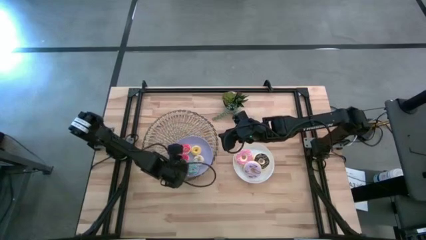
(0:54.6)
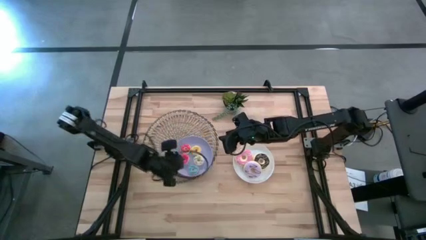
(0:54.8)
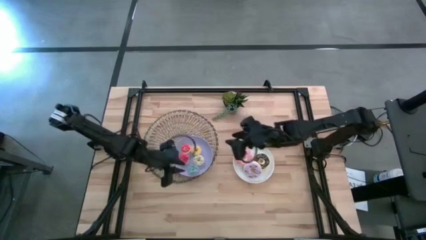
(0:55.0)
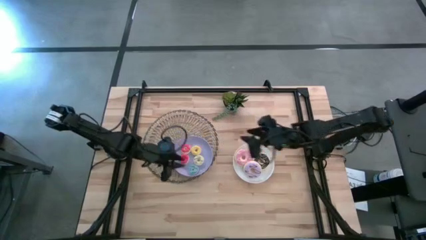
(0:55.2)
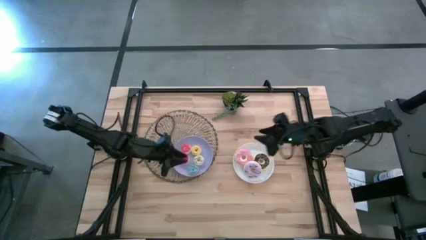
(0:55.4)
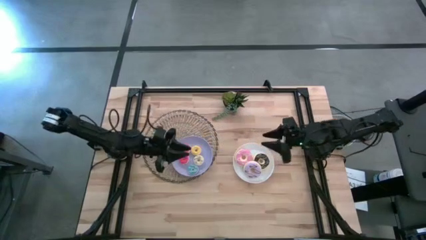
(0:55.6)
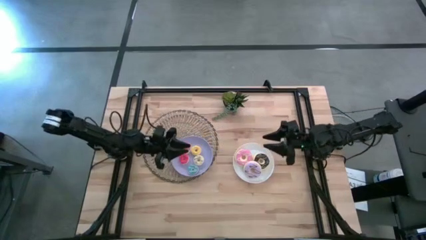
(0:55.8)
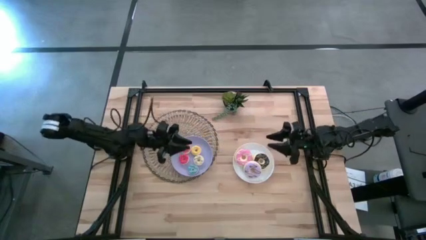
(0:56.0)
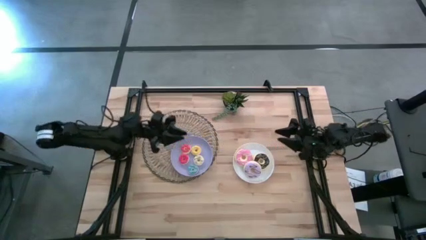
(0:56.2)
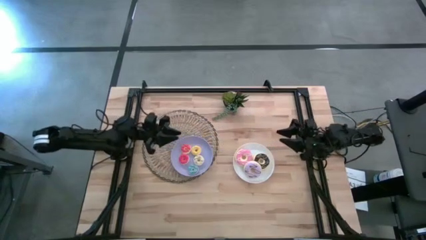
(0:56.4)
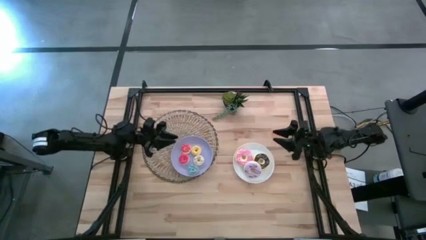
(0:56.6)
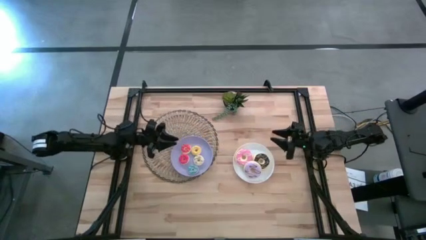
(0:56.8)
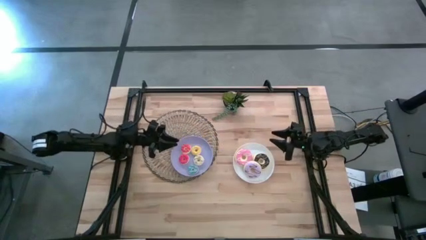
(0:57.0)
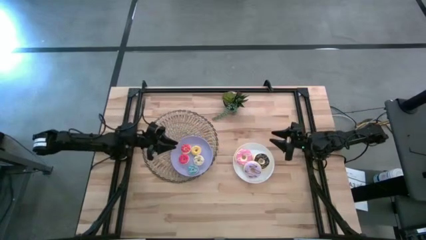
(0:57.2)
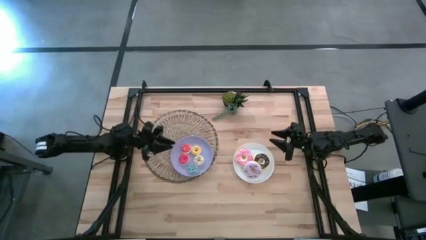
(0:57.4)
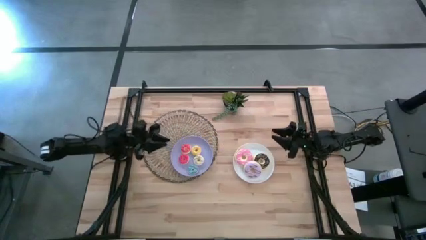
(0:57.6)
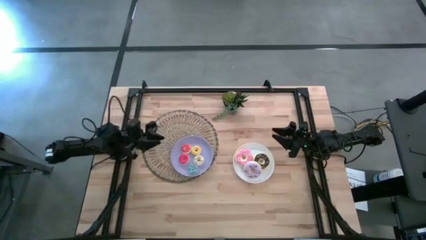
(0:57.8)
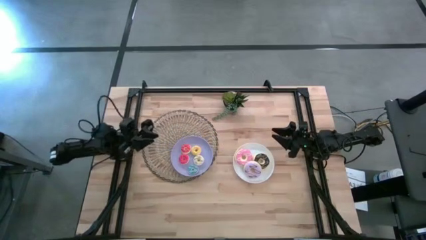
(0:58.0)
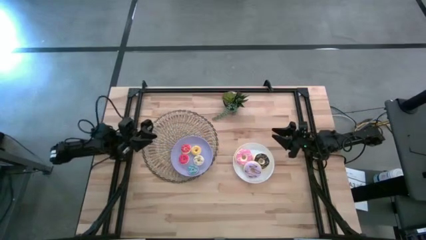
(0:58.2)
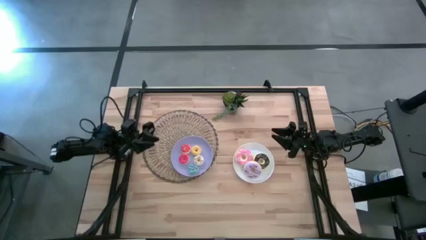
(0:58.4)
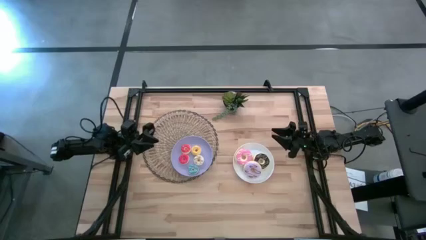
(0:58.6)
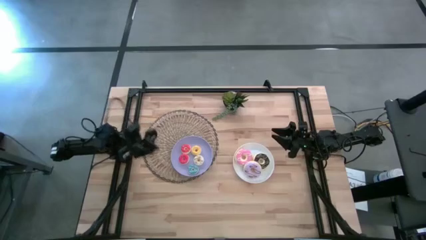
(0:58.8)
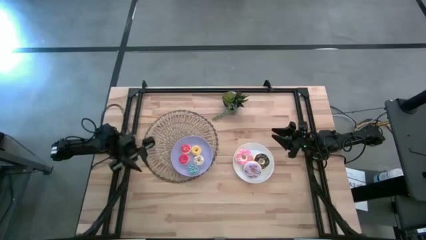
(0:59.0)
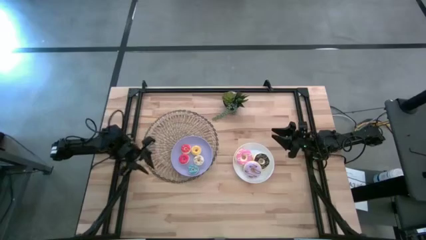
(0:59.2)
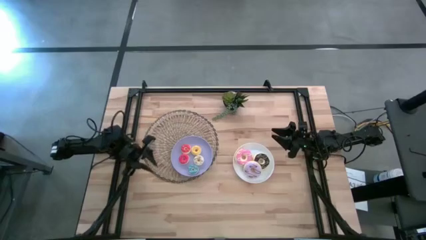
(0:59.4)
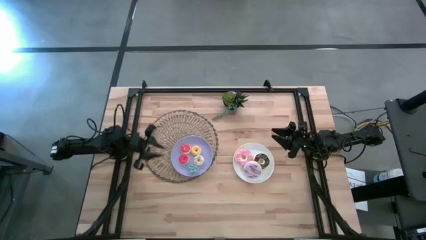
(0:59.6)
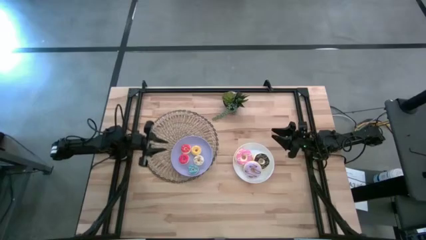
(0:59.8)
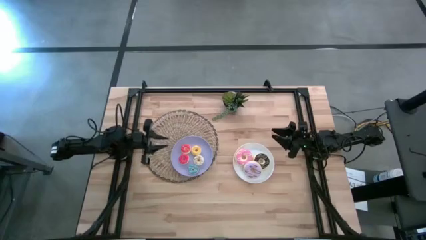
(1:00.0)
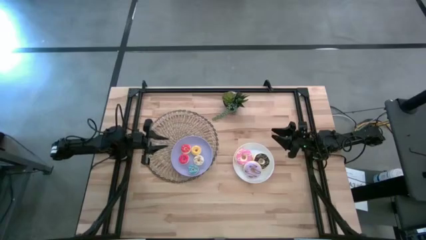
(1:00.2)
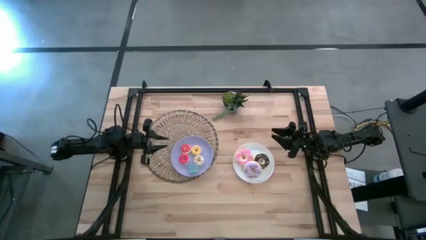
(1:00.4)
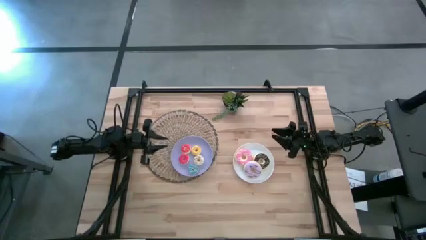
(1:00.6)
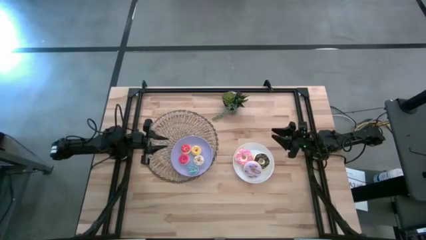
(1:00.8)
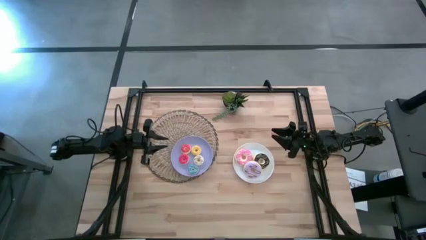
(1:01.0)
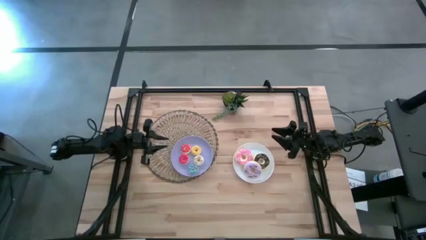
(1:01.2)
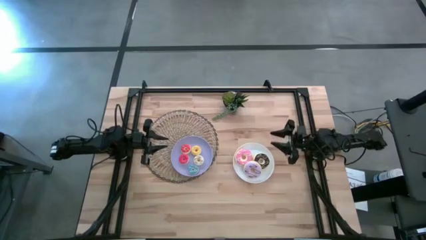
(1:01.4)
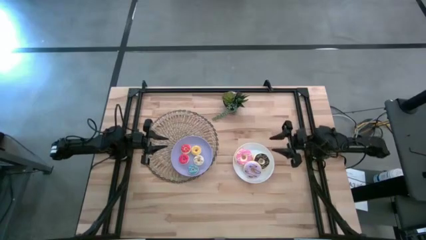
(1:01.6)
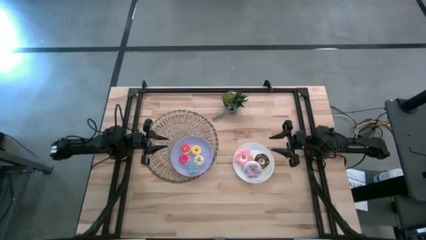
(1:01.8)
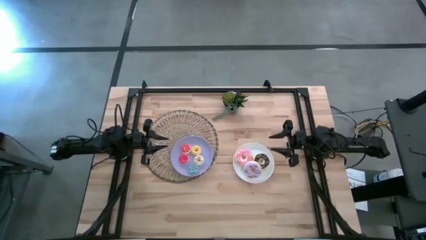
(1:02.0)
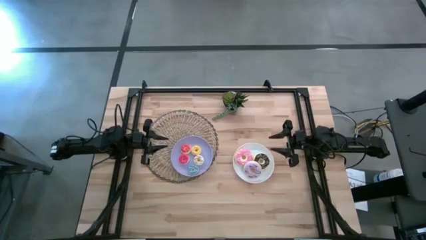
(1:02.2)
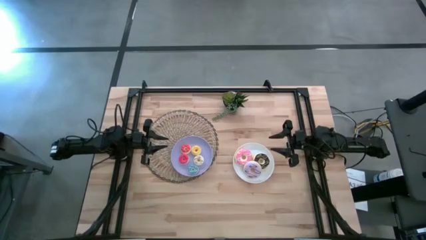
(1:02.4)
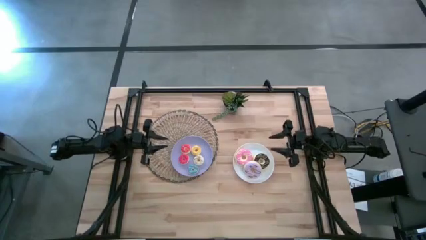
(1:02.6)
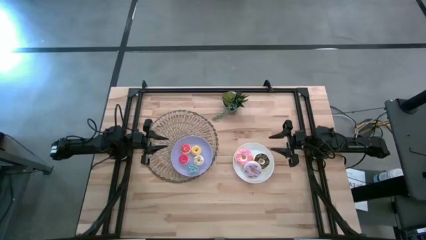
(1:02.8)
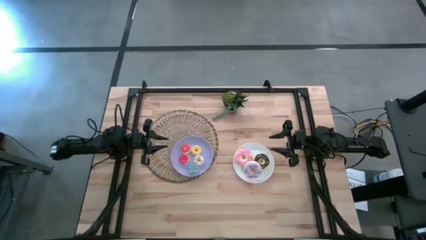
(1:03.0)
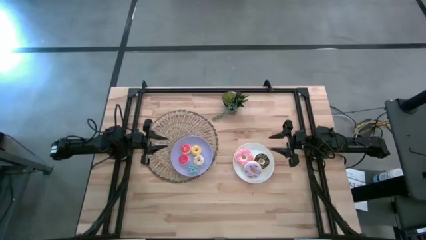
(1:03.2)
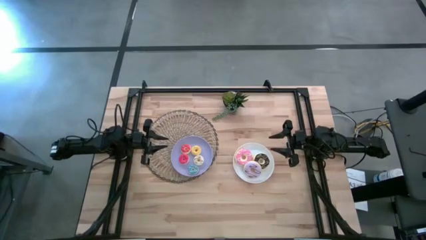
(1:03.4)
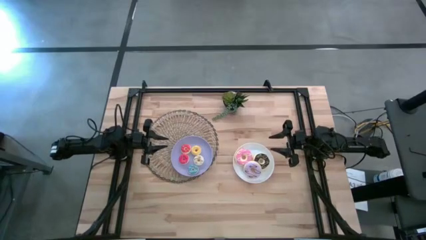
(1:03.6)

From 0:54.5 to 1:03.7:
Task: Pick & Place donuts
Return to Home Position

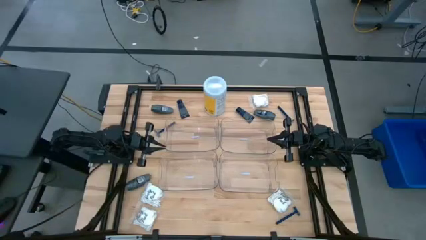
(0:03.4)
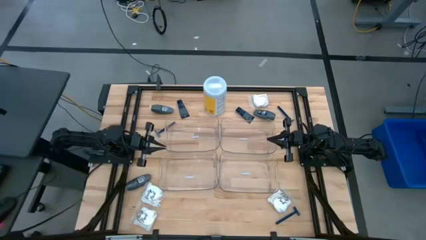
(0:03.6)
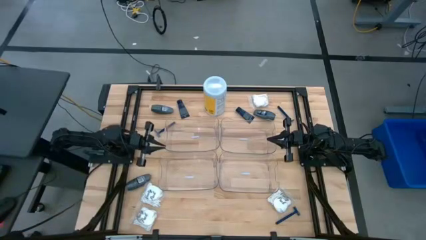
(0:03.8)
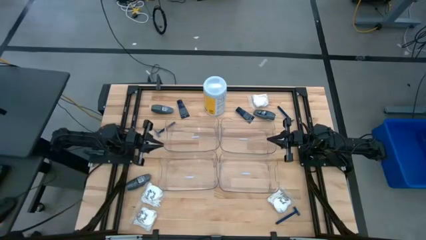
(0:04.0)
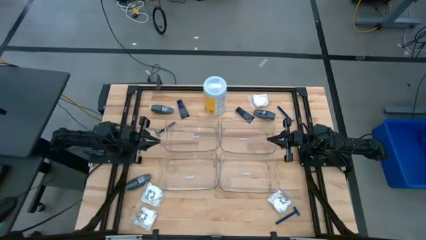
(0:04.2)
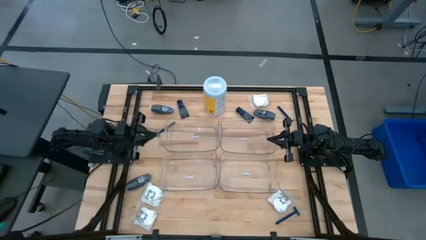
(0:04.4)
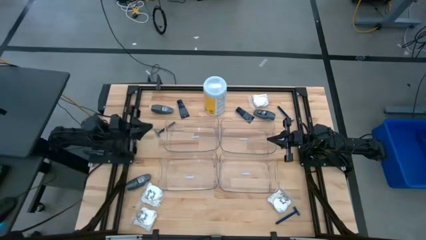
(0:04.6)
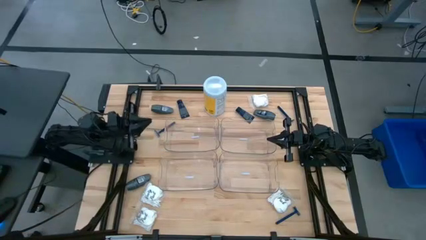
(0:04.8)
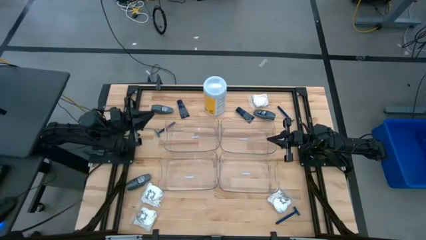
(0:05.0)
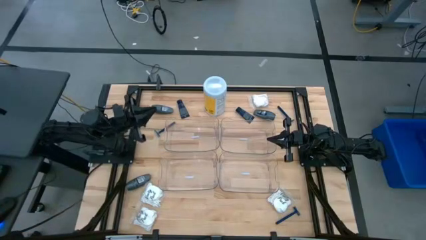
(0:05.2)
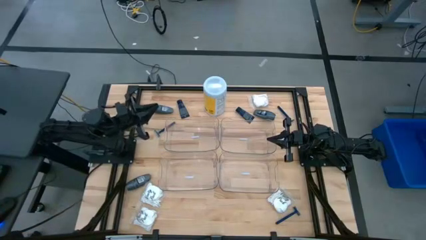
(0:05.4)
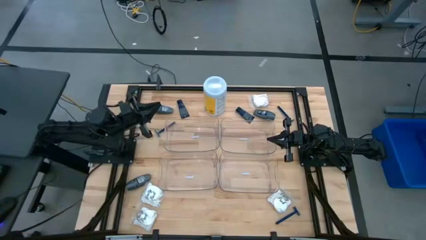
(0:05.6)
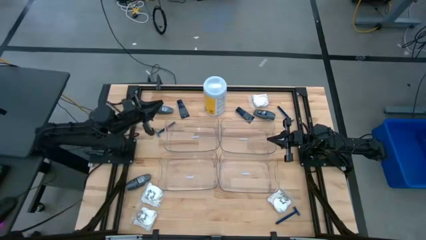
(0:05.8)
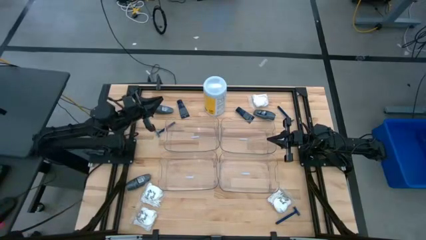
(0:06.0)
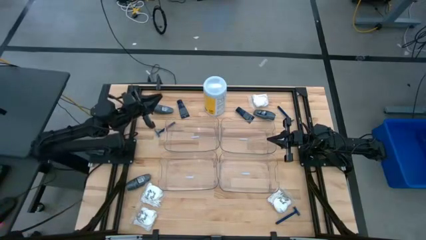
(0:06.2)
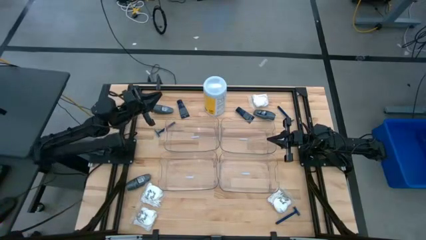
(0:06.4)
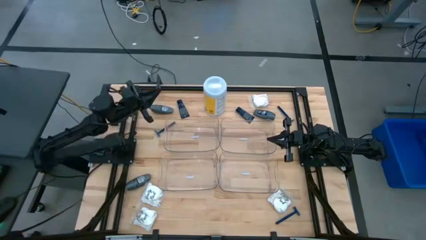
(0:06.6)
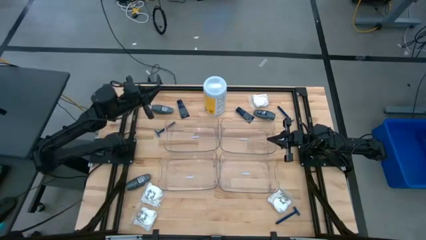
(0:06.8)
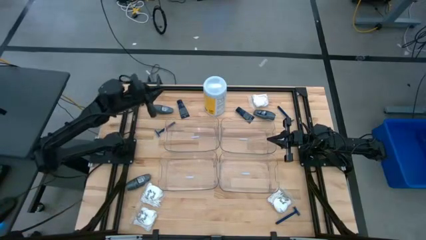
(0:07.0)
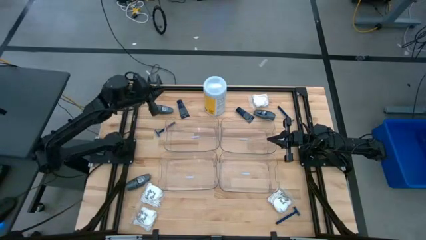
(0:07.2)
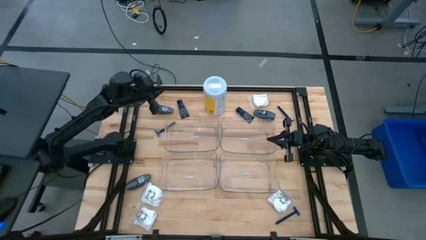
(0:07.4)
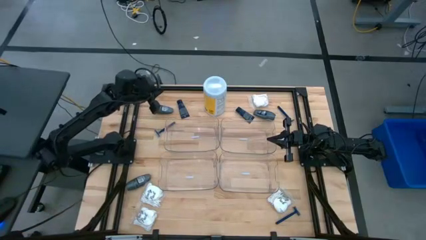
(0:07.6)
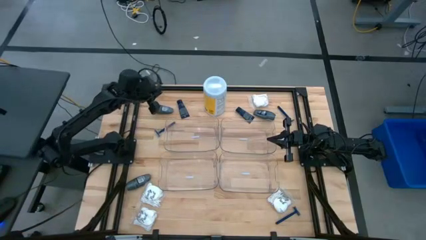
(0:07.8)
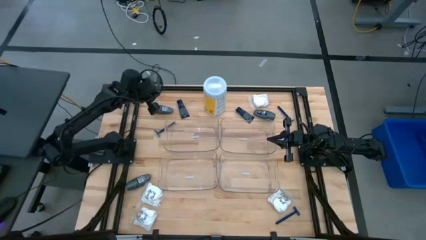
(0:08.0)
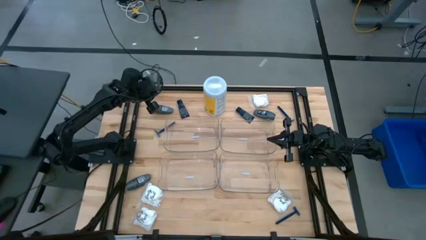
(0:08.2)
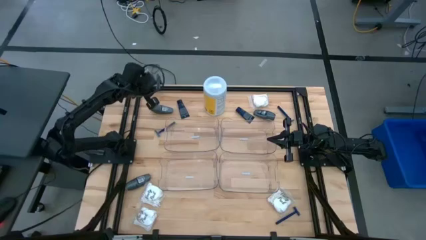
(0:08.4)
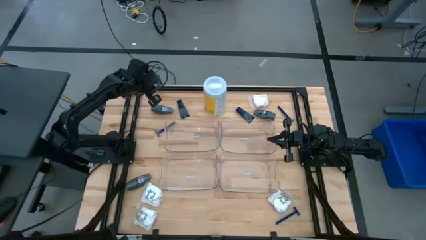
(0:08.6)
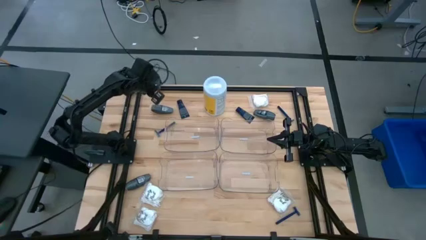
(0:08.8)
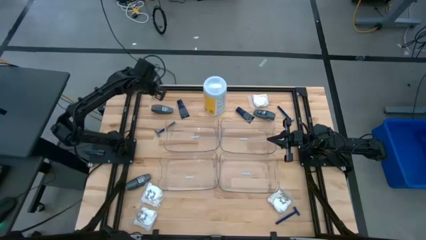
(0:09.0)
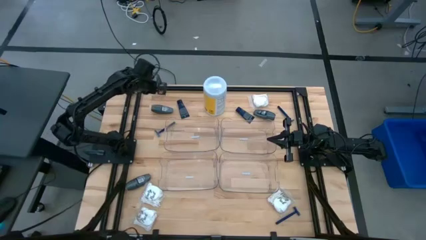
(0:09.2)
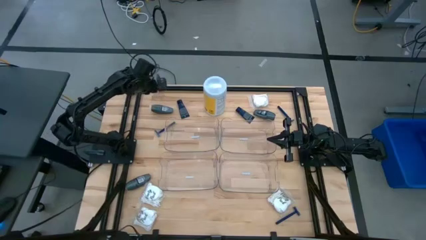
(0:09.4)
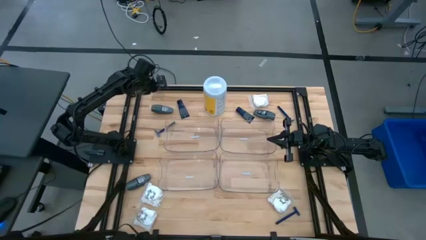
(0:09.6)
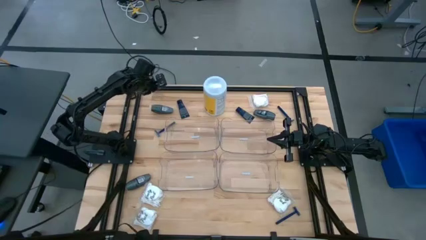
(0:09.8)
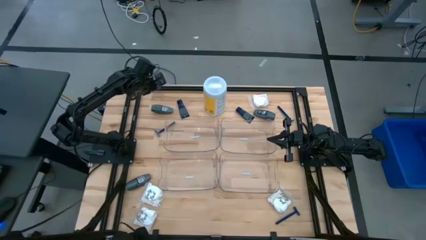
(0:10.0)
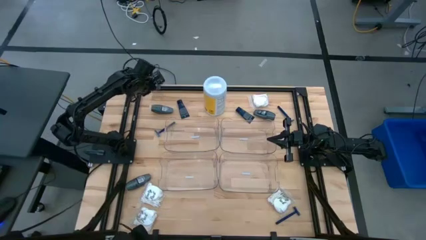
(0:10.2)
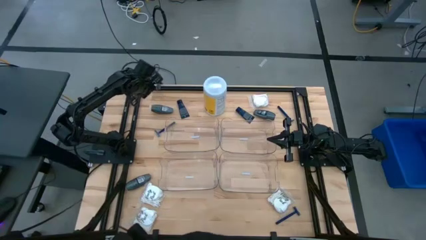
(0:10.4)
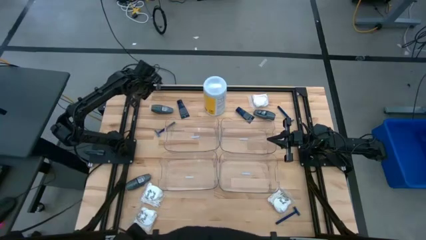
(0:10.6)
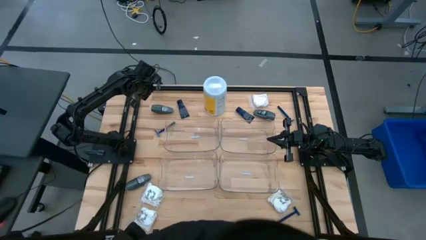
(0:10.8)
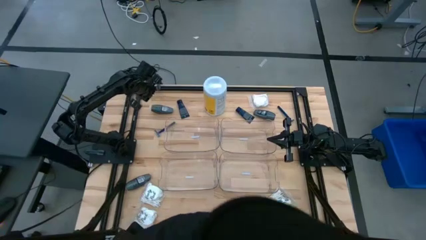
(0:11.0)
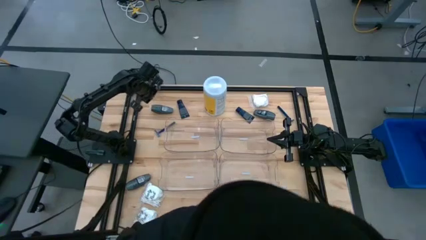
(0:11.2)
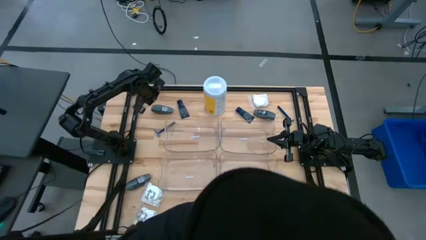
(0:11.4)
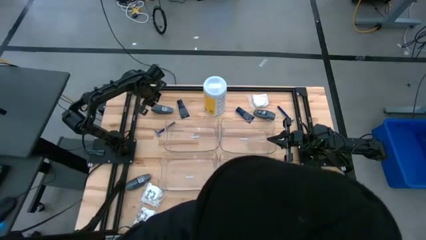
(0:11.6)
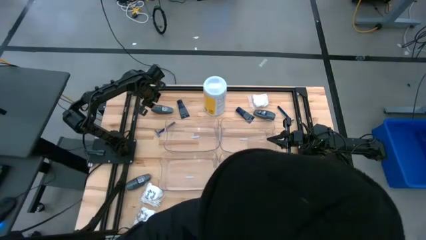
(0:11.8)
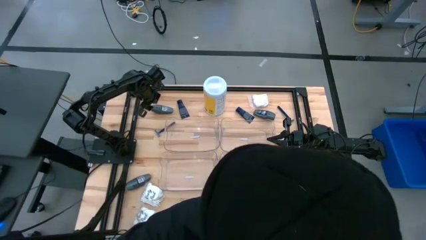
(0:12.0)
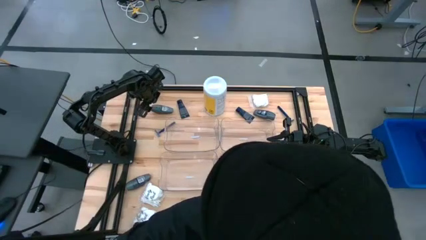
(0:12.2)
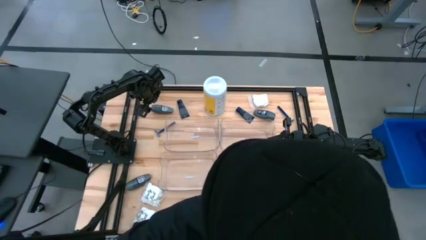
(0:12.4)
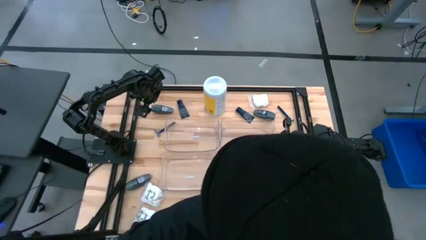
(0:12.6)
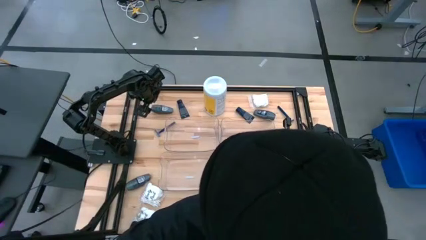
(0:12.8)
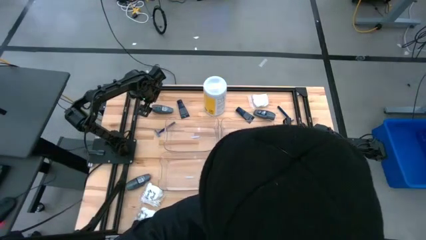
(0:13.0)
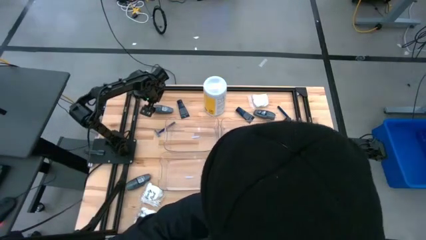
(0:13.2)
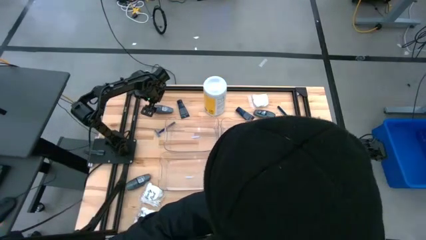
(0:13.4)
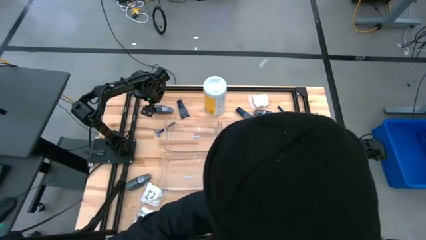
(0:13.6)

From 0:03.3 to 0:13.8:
Task: Pick & Place Travel size toiletries
Put the top left black deodorant into the top left transparent bin
